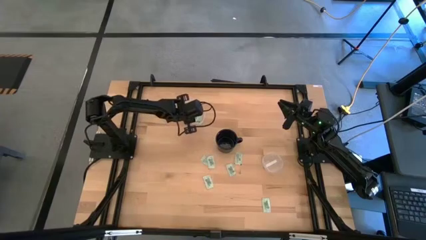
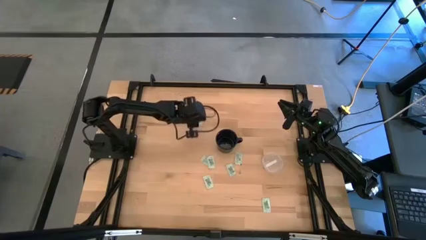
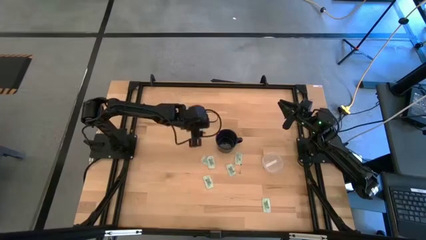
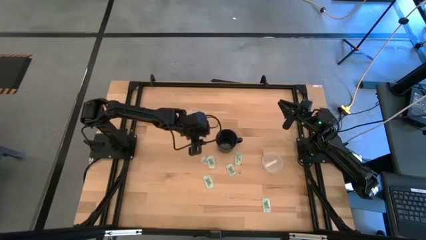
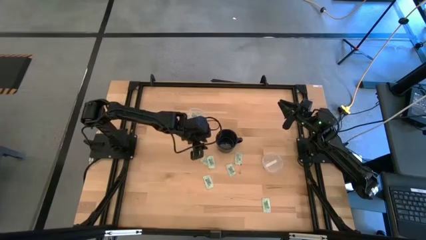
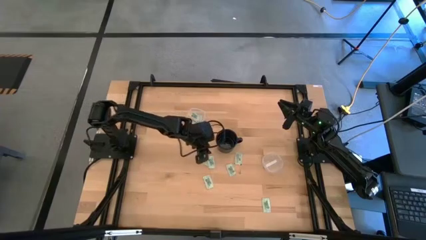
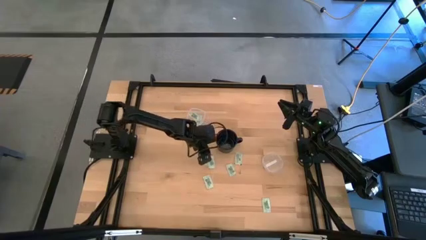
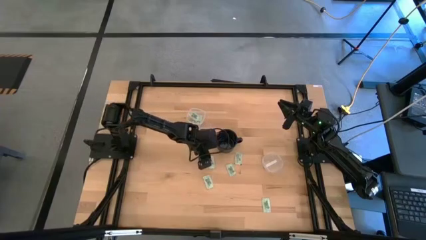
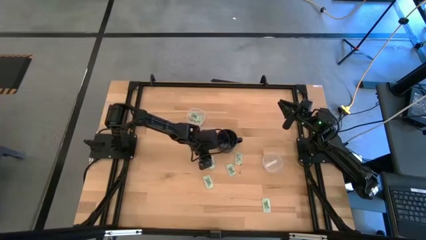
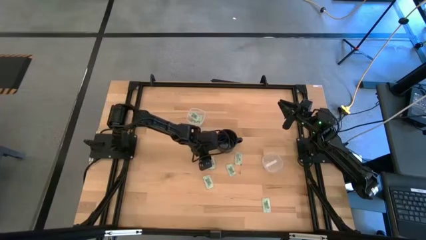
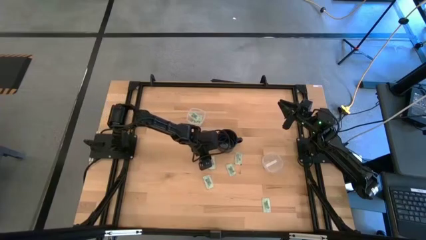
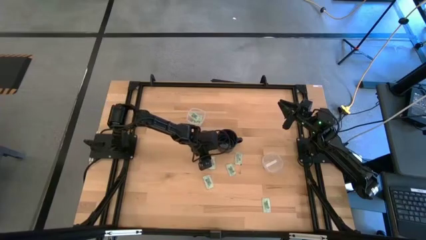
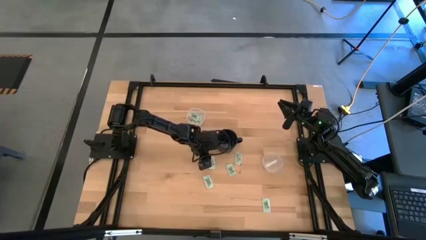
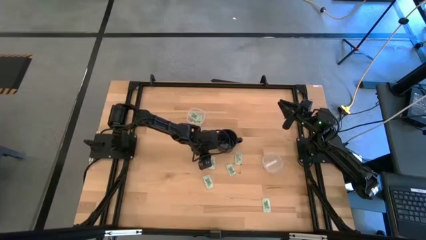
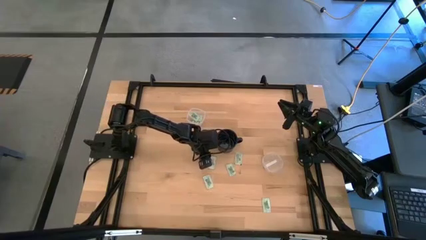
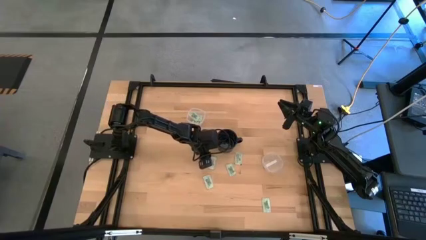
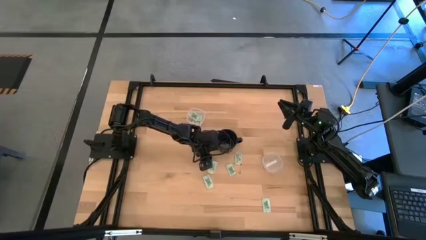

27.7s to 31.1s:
Task: Pick and place items into bin
Put the green stevia packet into the top transparent bin

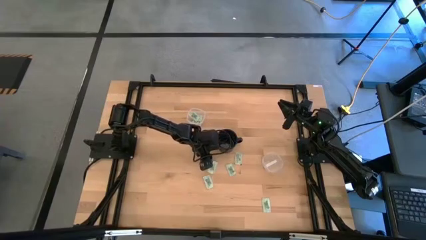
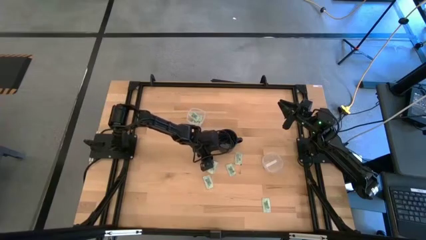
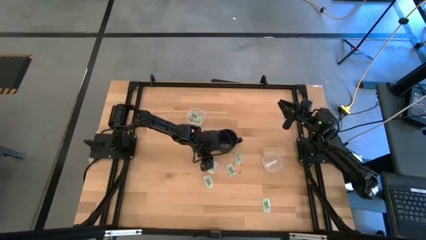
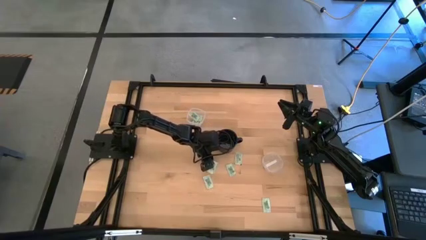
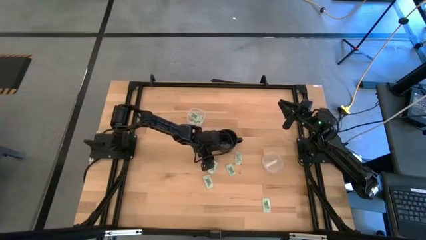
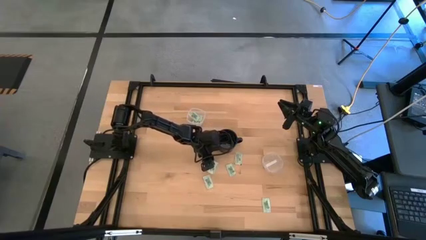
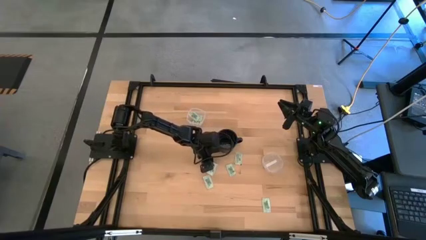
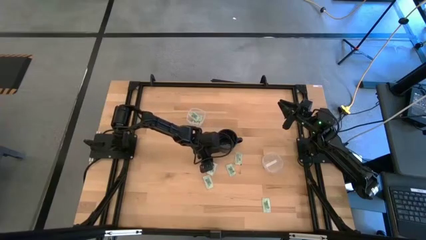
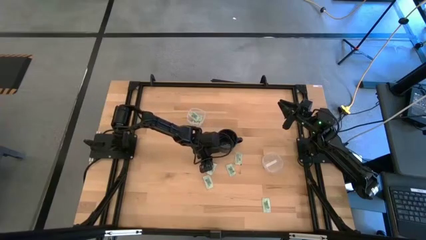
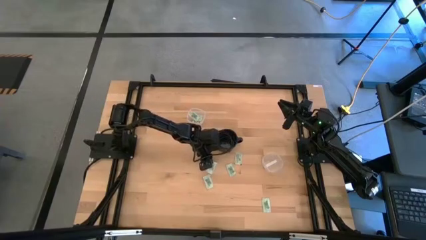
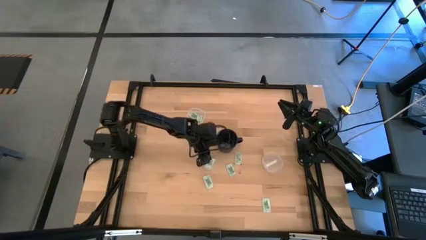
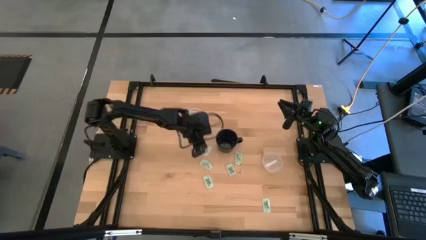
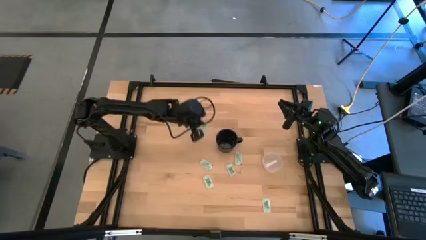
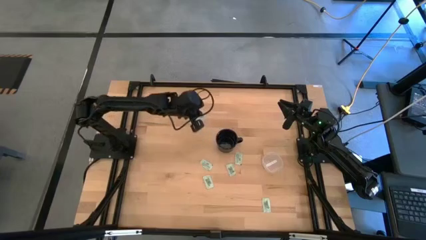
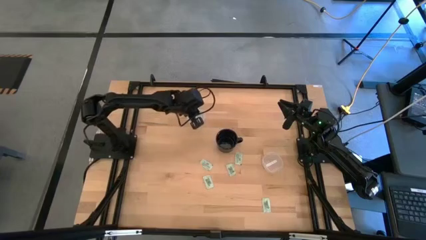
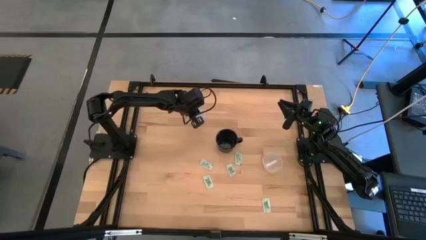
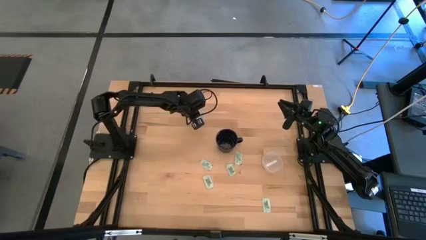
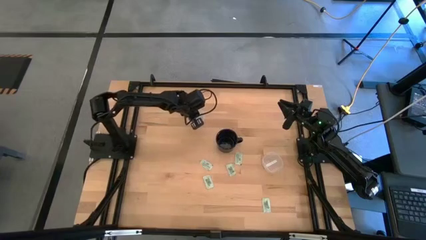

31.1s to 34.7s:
Put the green stevia packet into the top transparent bin

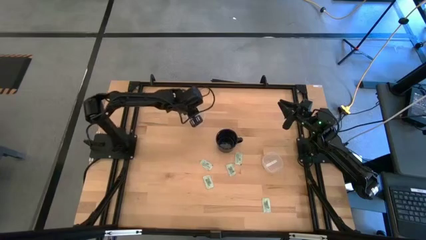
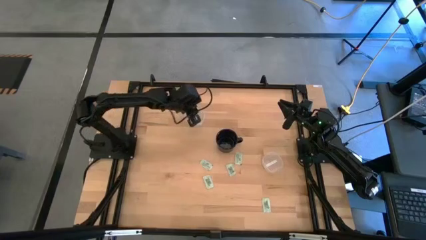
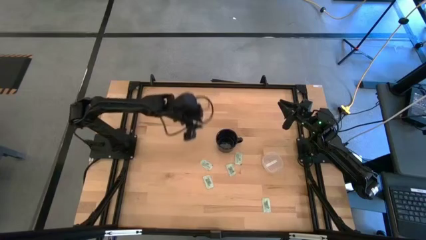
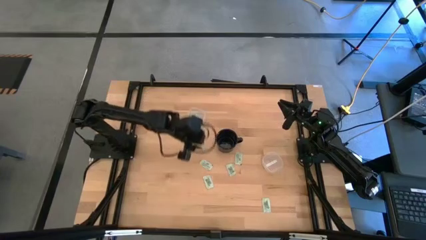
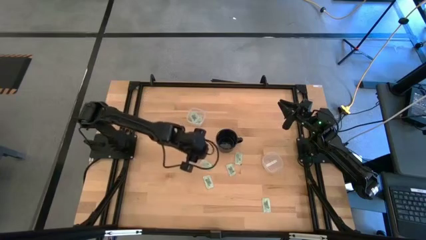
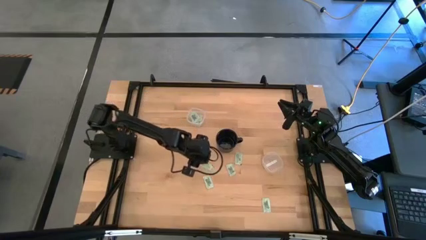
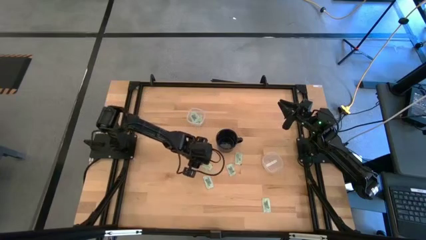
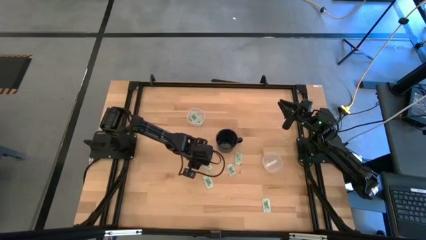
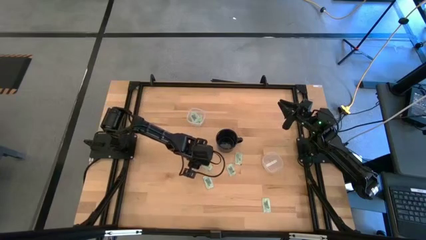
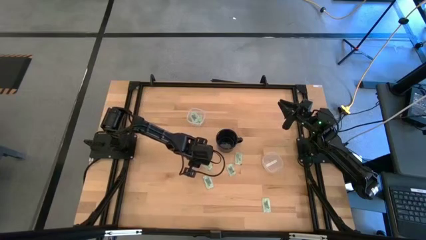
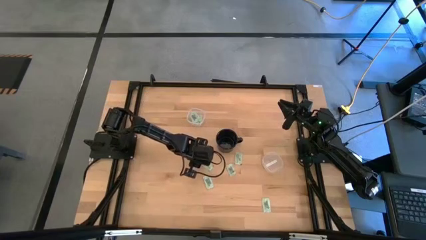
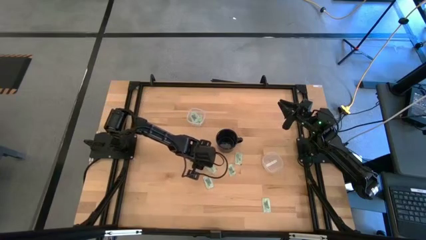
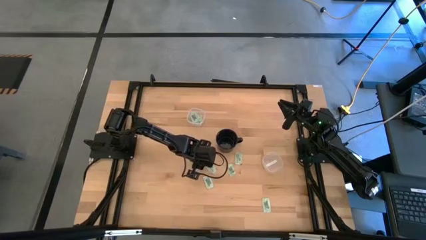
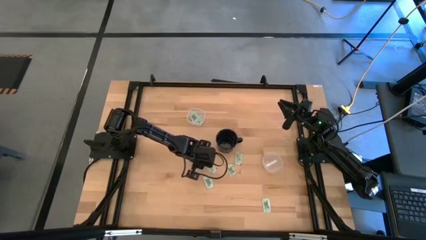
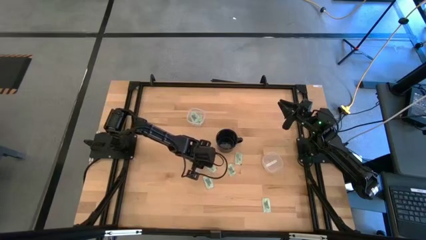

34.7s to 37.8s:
Put the green stevia packet into the top transparent bin

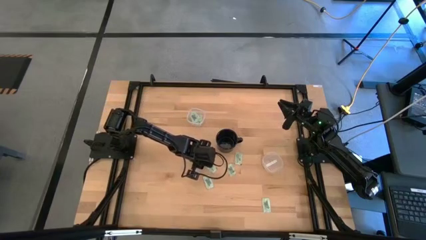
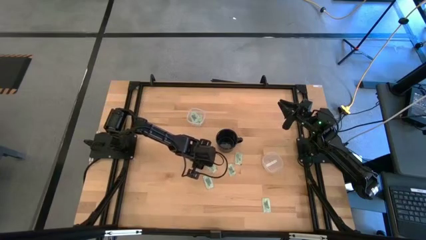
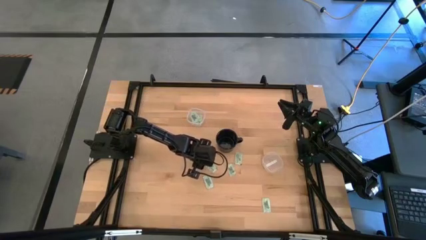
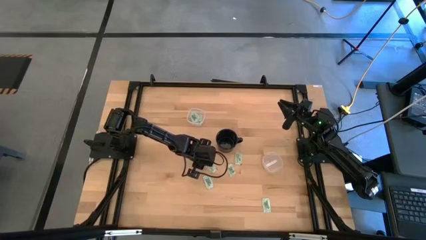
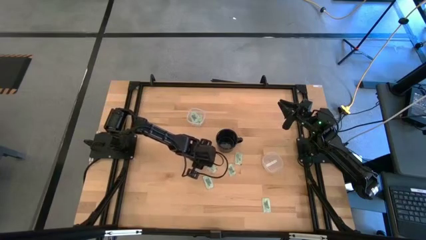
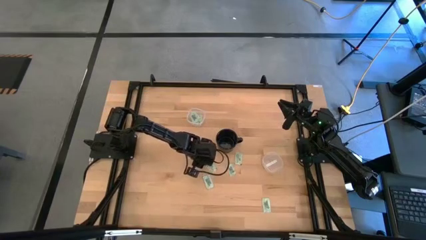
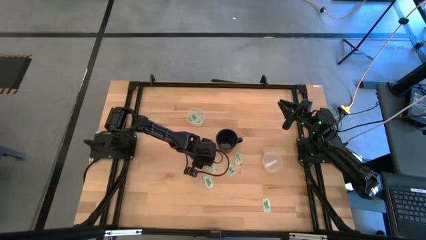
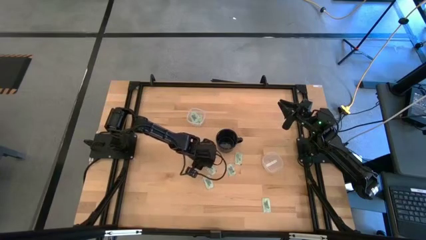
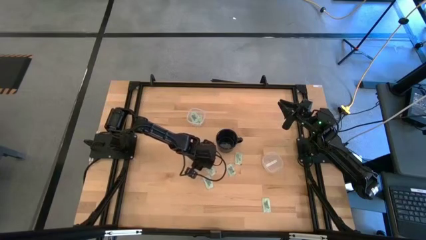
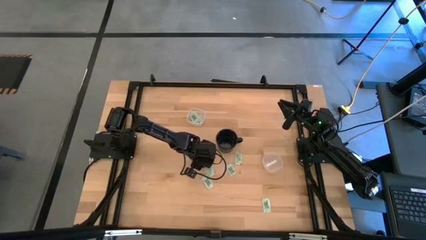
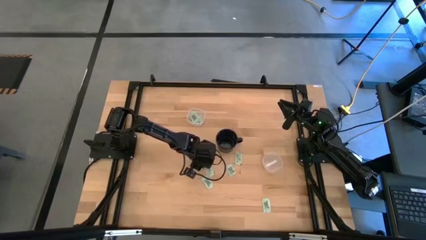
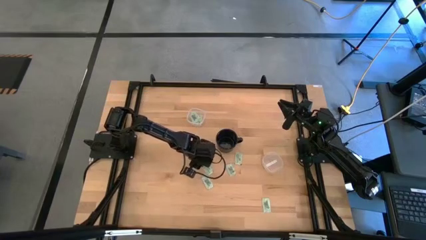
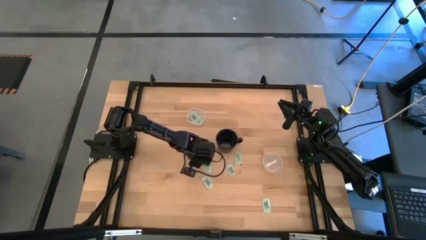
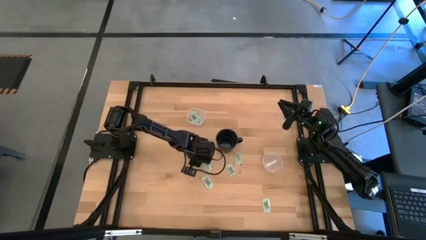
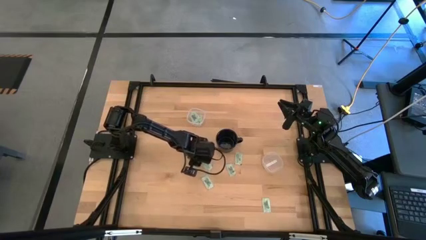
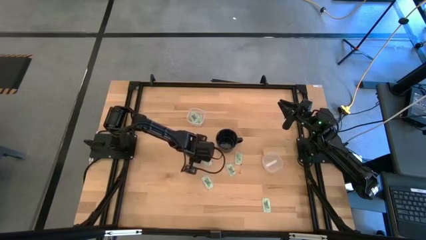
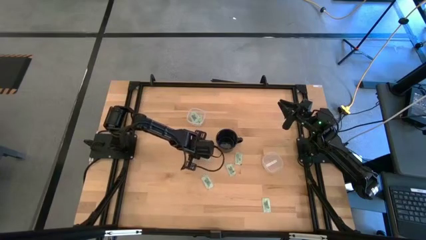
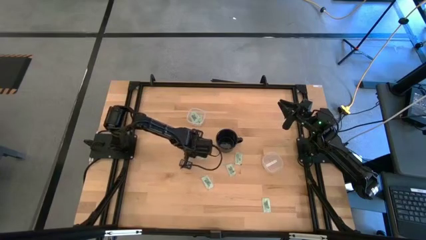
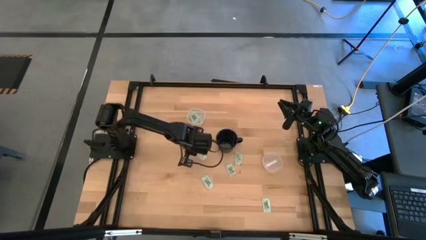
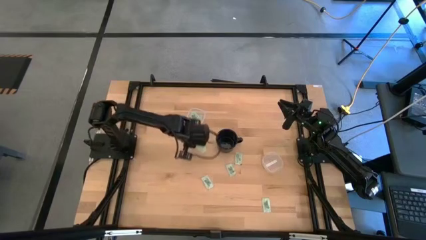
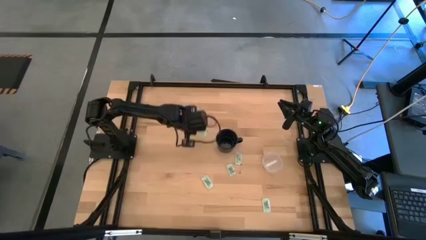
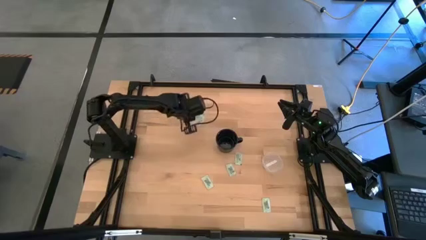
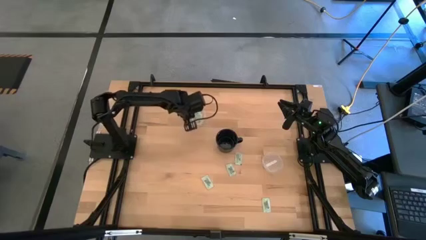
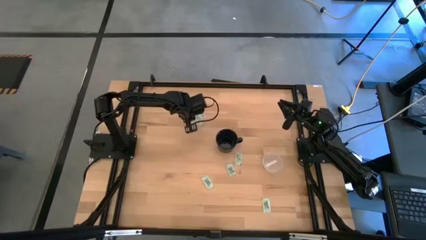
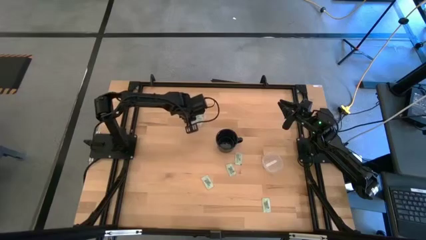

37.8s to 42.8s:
Put the green stevia packet into the top transparent bin

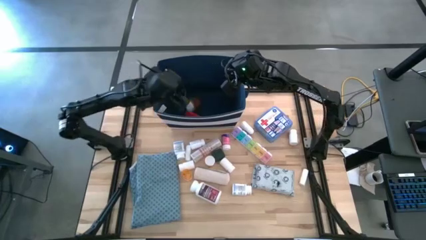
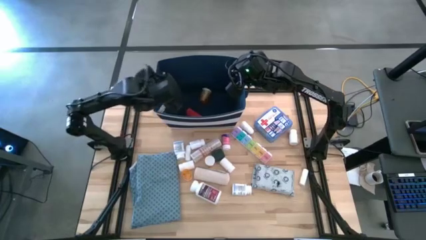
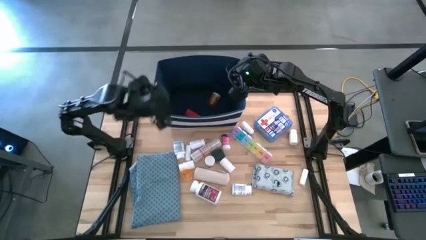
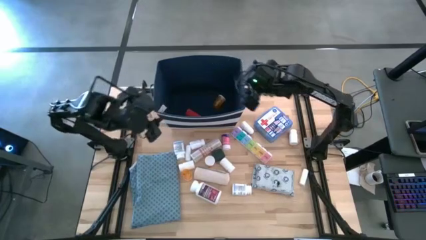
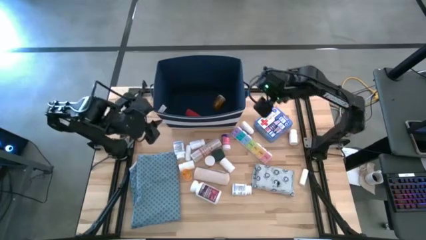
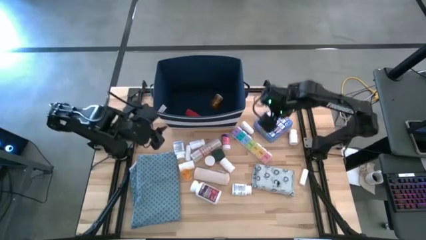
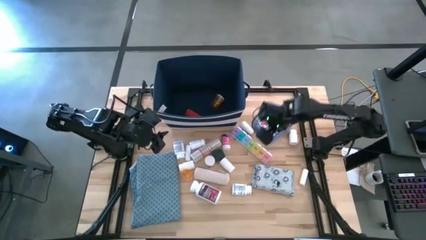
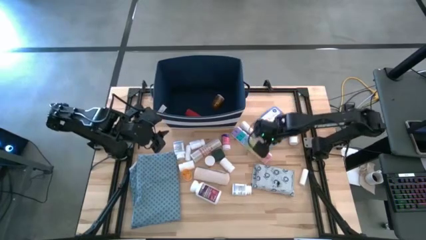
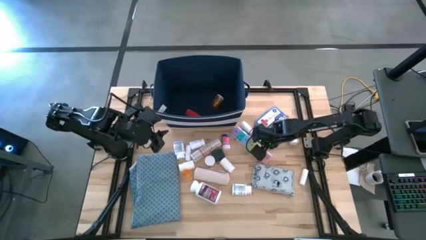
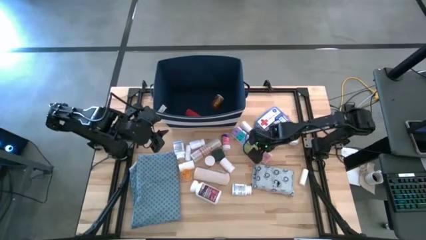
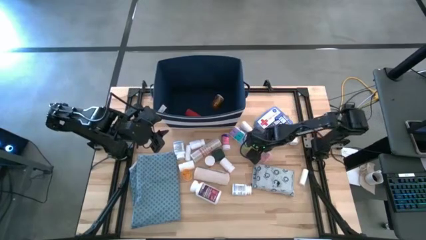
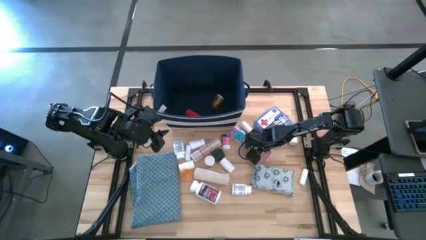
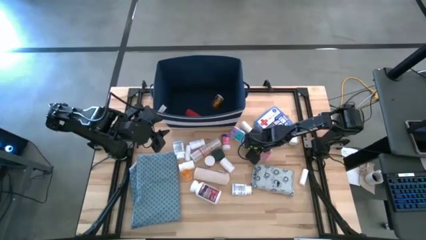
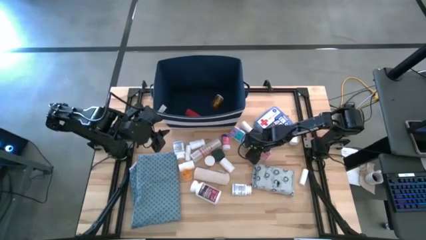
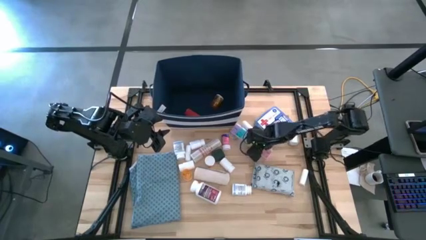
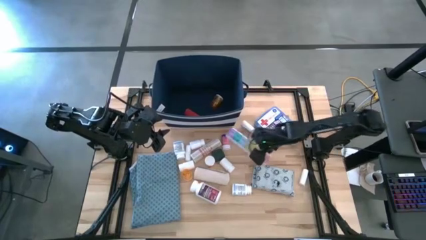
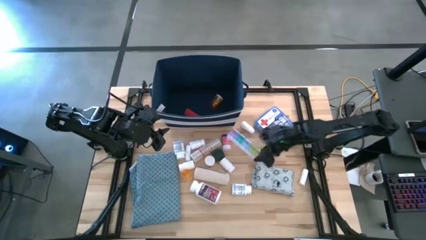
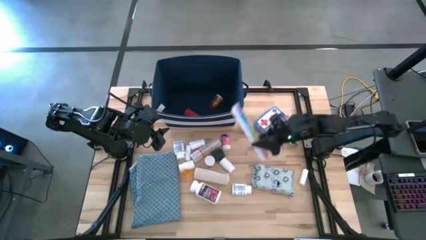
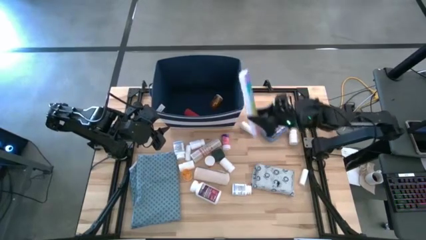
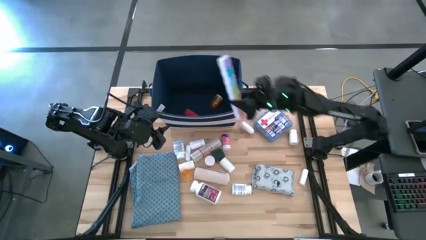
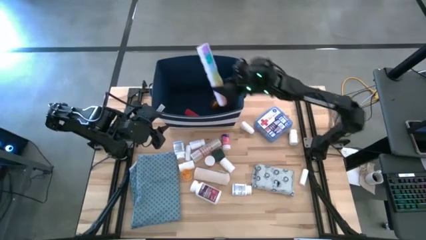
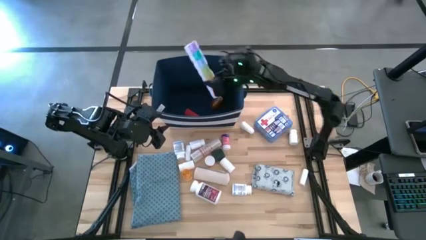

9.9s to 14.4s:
Task: Pick & place medical supplies in basket/bin
Put the medicine organizer into the blue bin
